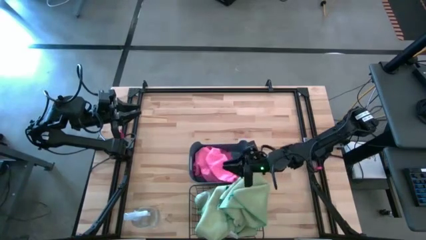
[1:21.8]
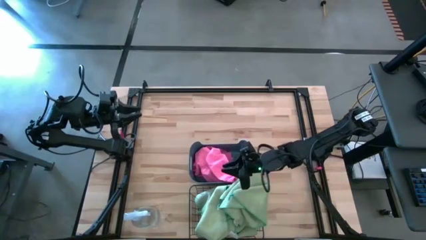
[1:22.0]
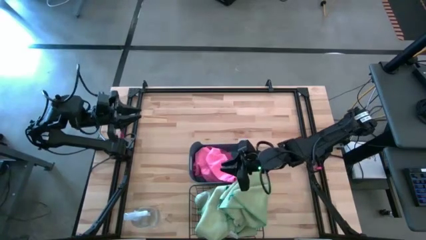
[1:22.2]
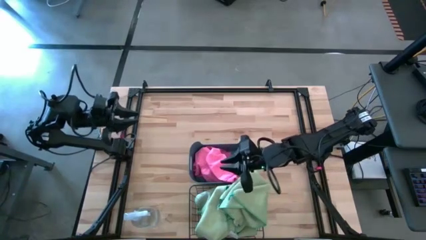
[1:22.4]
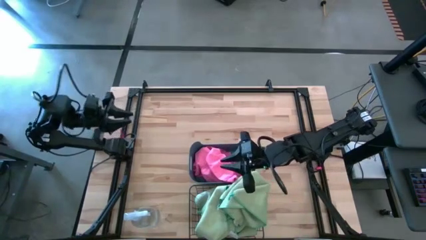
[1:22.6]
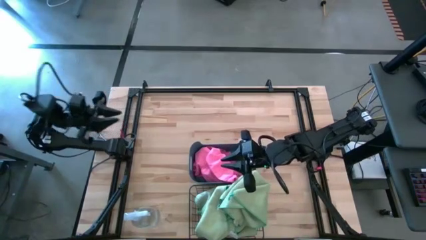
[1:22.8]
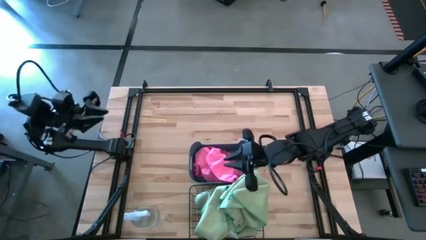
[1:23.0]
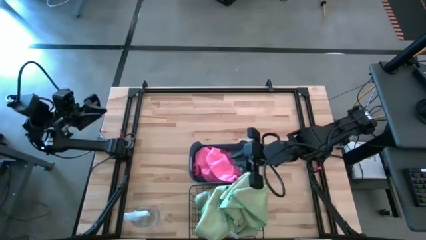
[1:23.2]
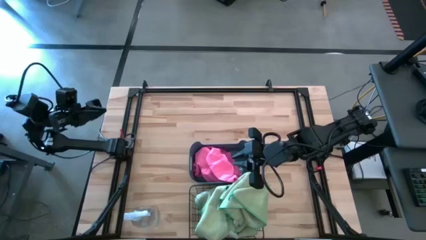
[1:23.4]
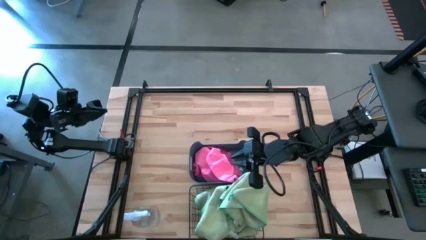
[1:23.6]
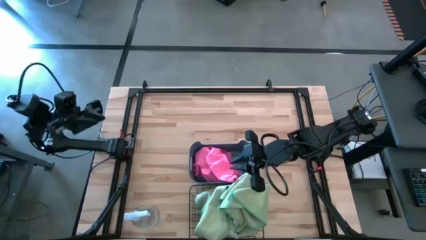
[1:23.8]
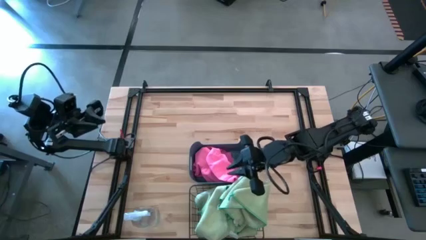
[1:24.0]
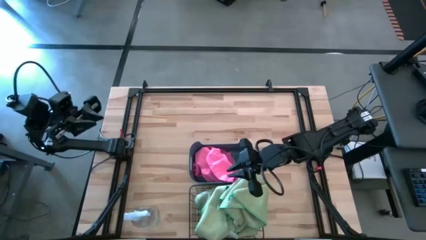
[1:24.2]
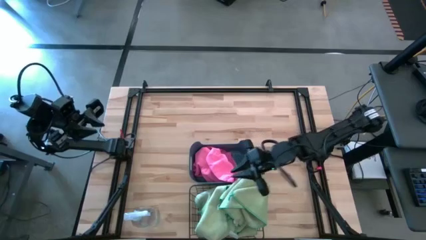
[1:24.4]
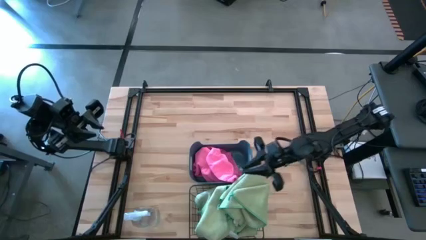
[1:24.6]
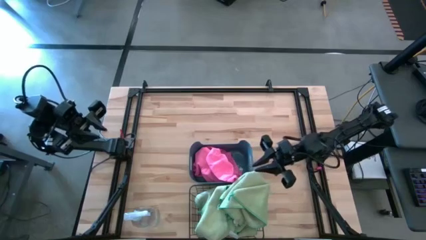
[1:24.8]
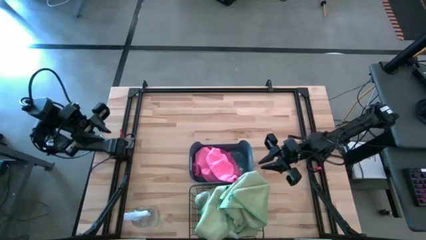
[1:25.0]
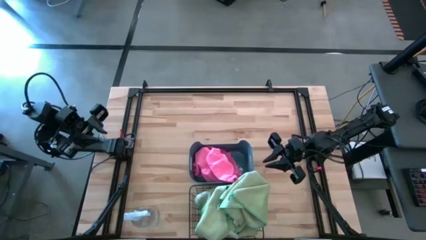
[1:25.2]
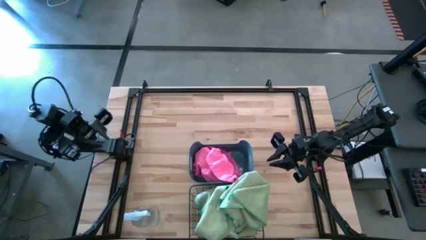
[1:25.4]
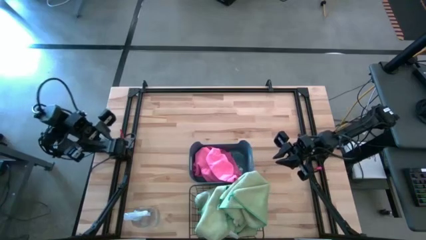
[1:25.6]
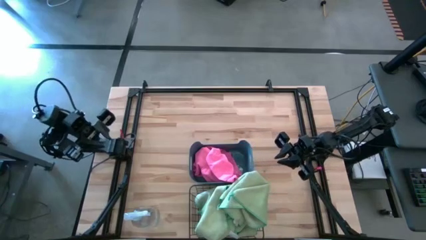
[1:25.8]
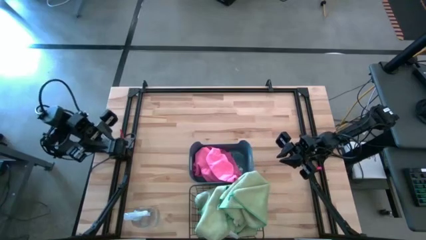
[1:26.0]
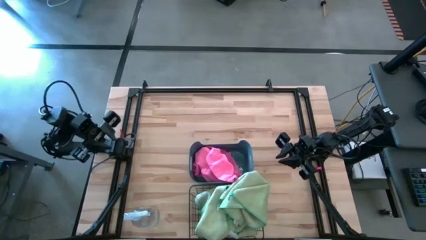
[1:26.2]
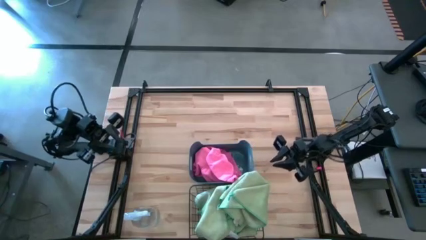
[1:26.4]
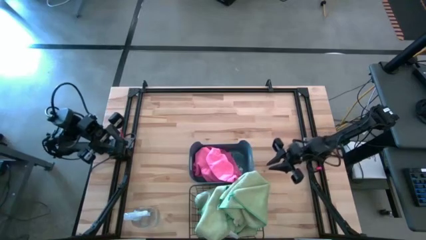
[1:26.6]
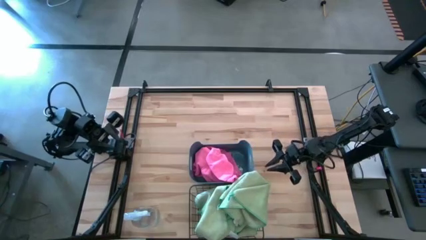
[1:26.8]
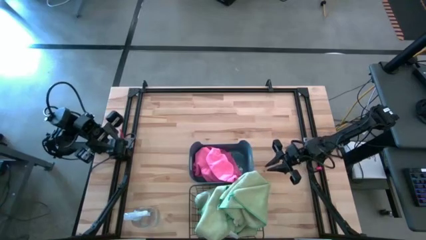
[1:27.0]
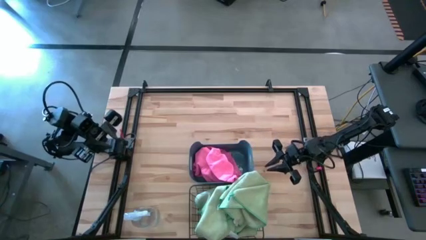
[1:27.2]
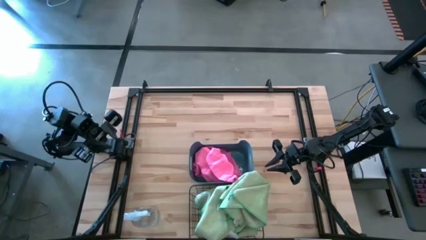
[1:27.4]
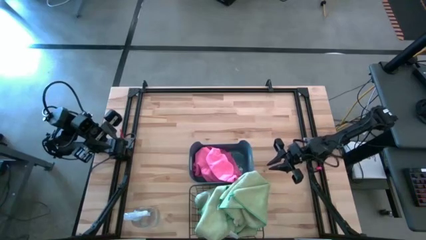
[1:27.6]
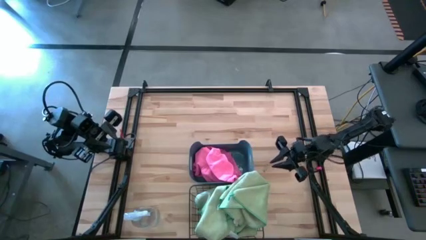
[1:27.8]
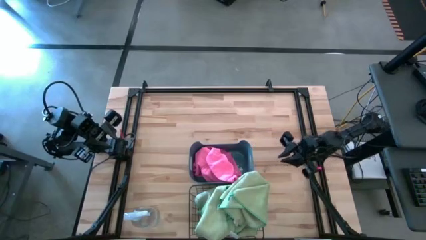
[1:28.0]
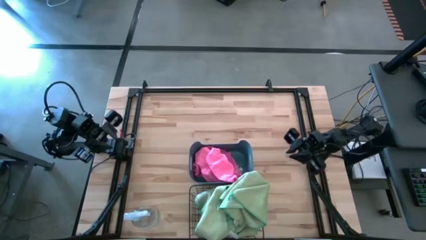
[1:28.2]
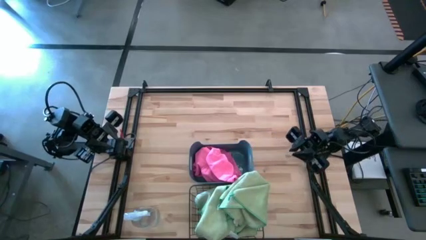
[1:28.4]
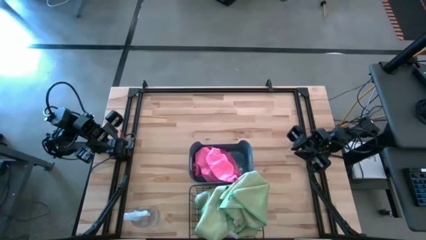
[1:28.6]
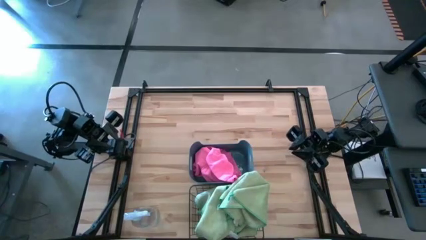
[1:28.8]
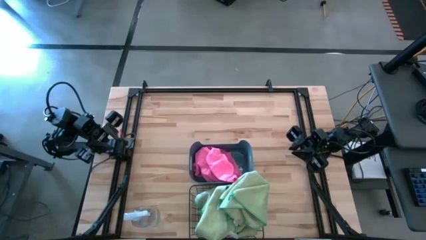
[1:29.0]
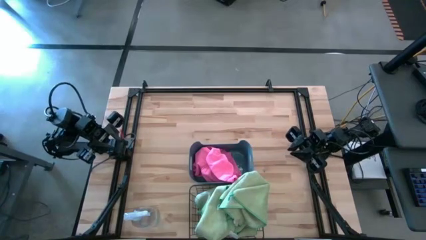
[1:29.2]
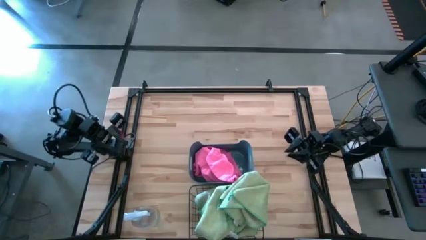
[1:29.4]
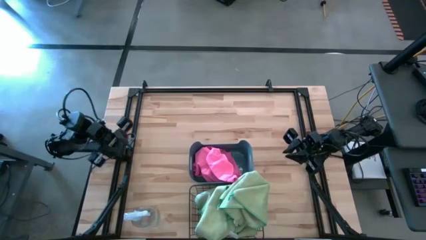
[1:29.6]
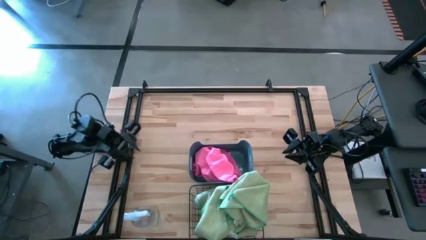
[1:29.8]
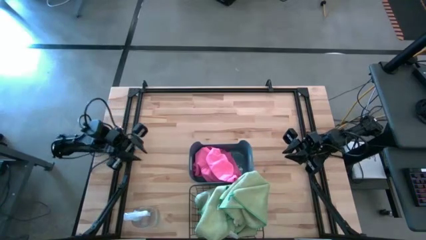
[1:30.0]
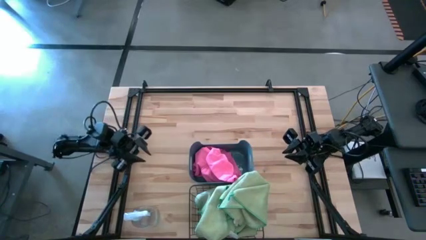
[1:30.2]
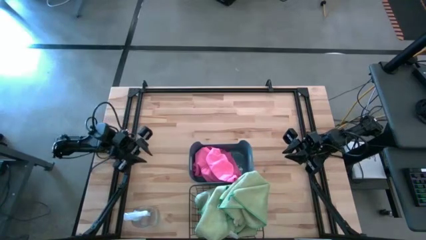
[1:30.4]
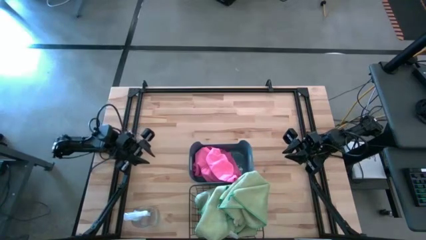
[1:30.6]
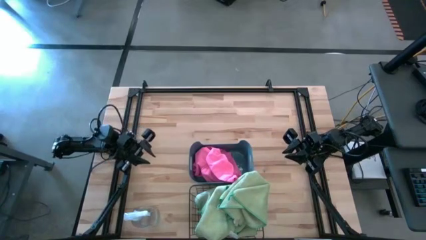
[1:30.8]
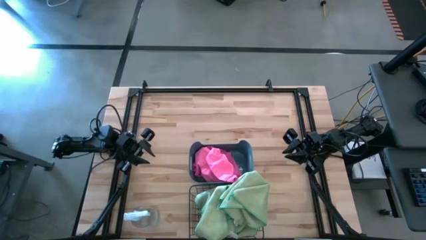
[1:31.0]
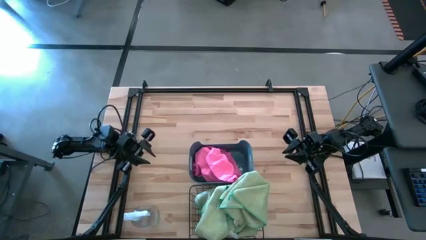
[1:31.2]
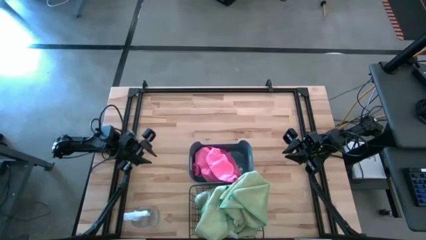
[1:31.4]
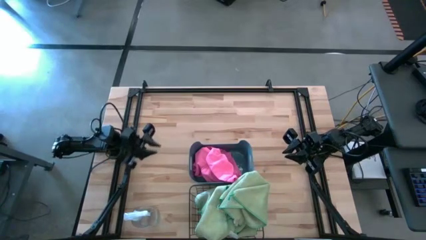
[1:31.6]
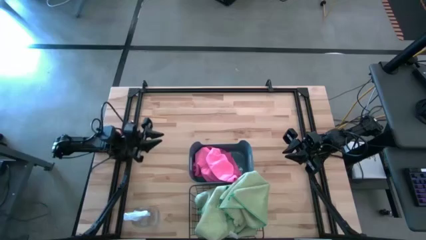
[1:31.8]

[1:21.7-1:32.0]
Task: Sort microfiber towel by color & place in baskets
Return to Home Position

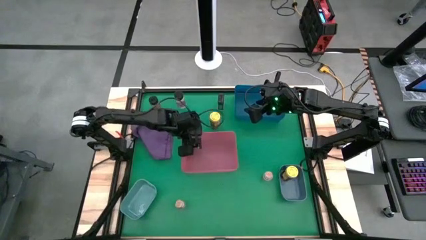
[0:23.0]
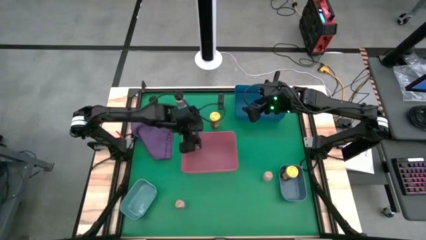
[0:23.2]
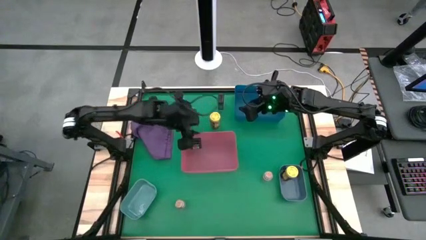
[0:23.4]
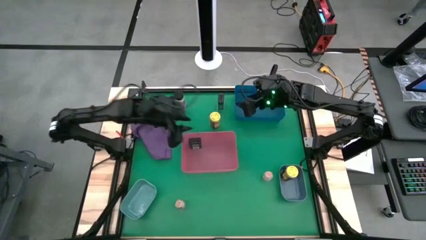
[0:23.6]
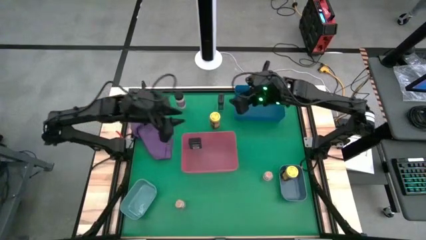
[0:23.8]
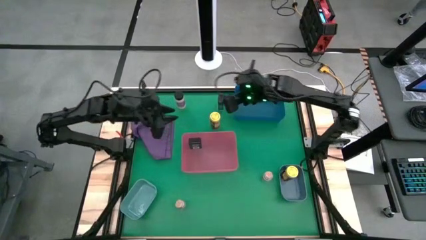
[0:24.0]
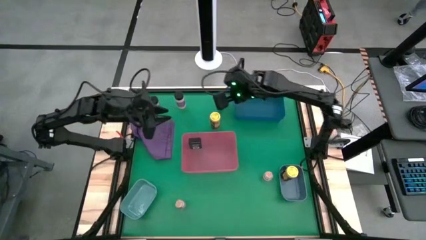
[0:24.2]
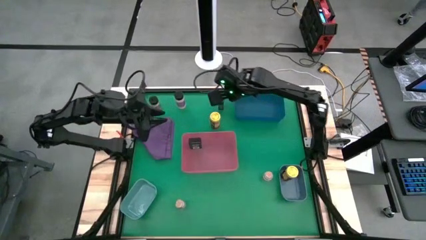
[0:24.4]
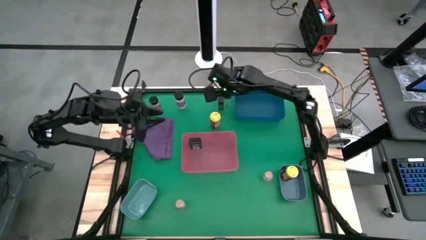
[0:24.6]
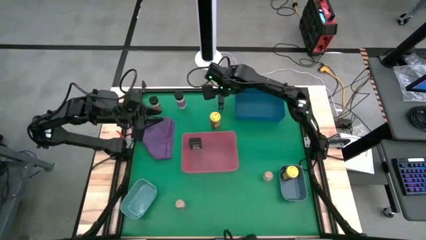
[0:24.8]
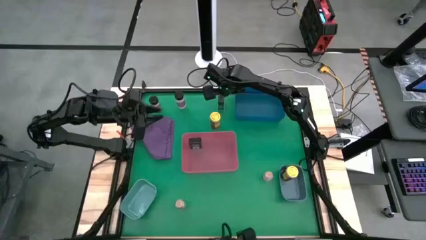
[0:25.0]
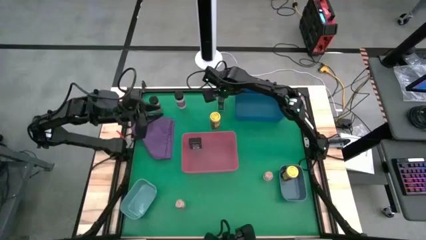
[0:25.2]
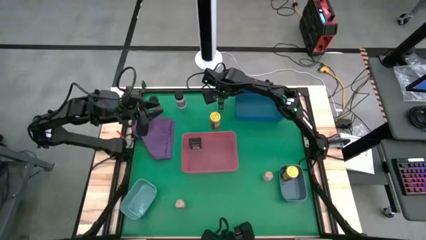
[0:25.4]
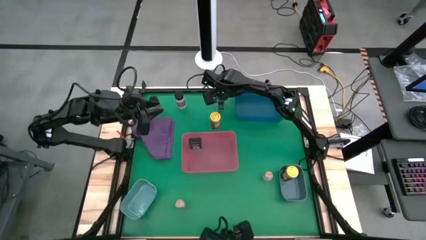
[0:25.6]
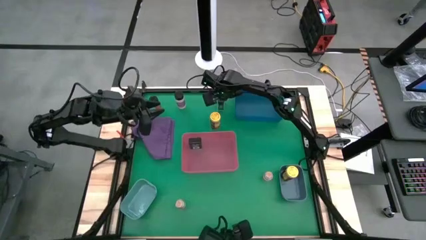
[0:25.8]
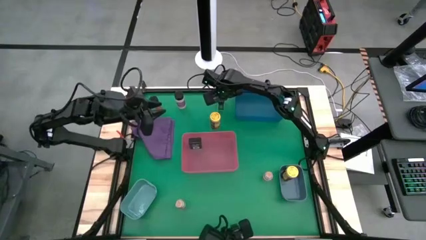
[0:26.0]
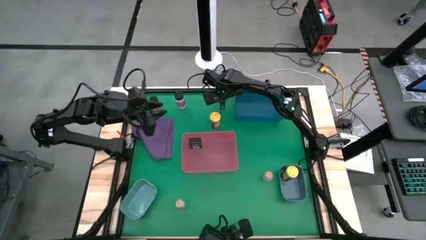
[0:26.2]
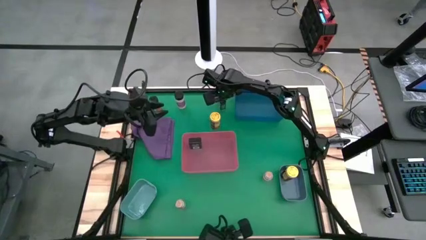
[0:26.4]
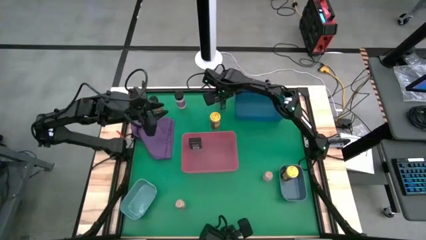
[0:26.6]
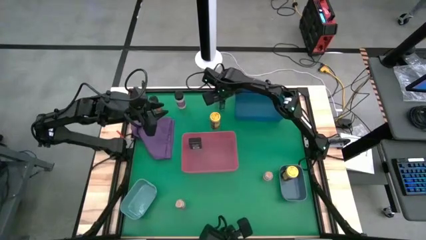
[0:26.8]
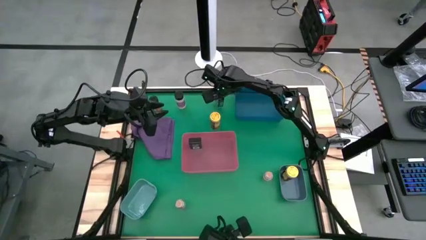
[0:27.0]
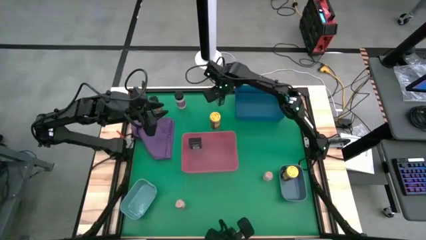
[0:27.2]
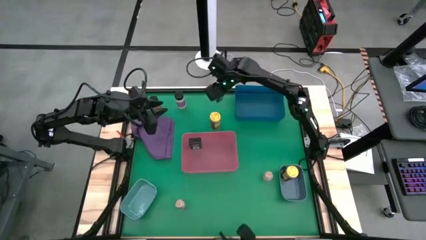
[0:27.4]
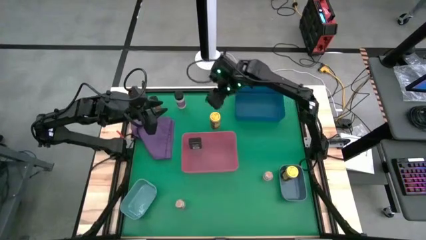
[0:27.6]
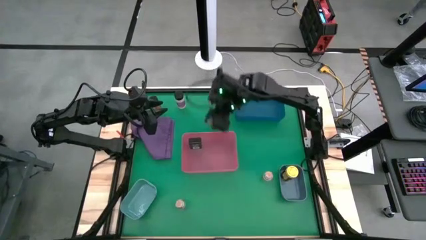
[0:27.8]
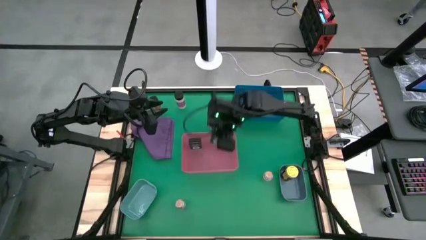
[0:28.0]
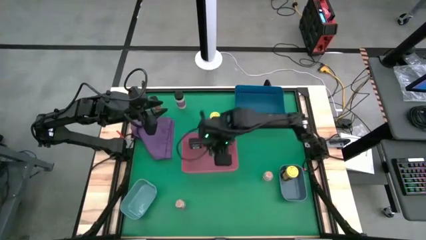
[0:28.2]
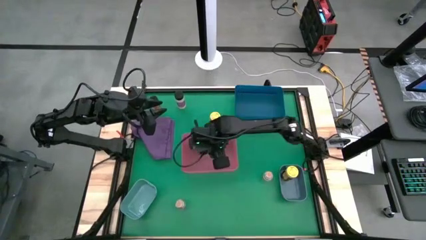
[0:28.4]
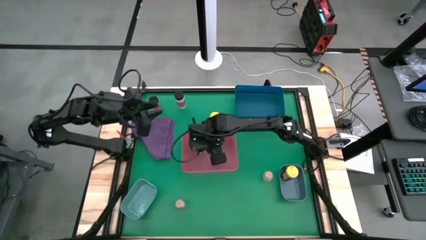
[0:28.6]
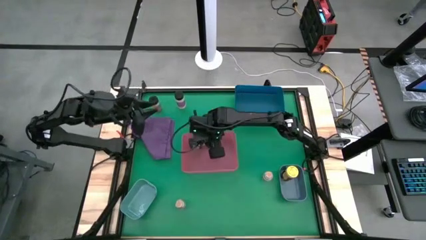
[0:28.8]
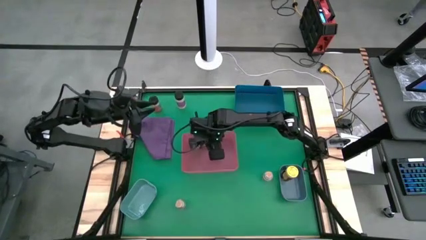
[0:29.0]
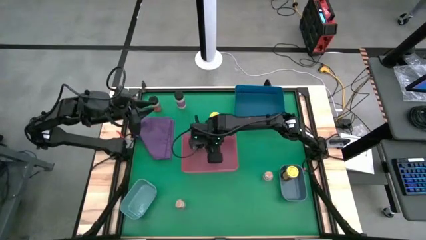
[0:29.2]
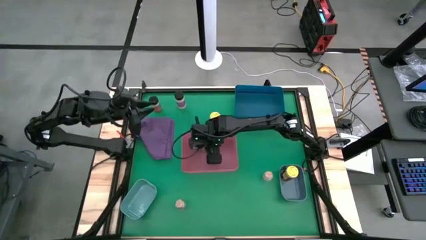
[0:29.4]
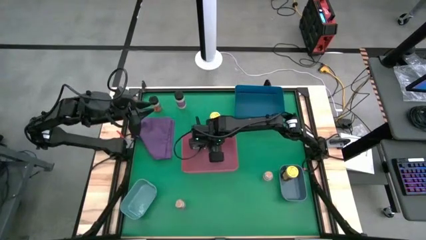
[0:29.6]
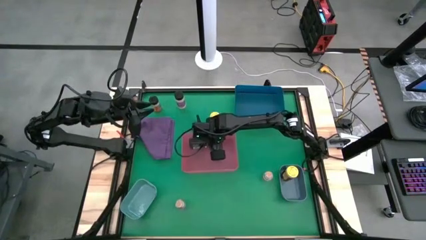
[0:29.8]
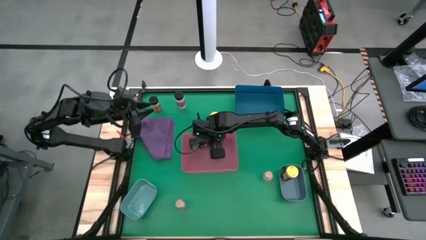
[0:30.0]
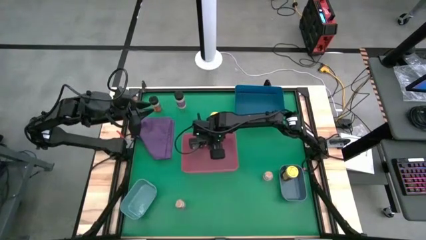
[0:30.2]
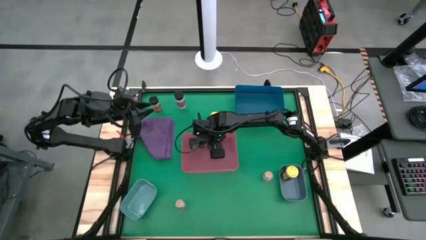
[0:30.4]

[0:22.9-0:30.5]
Task: Sort spices by type
Put the black seasoning can into the pink bin
